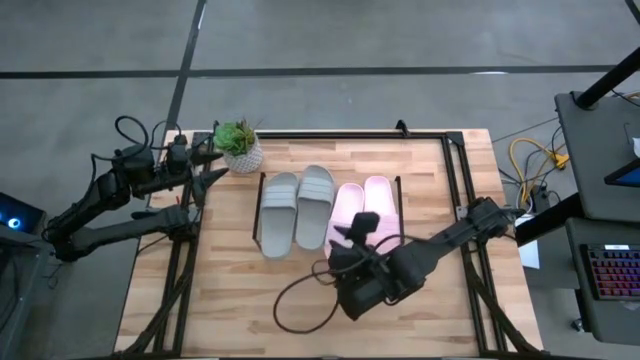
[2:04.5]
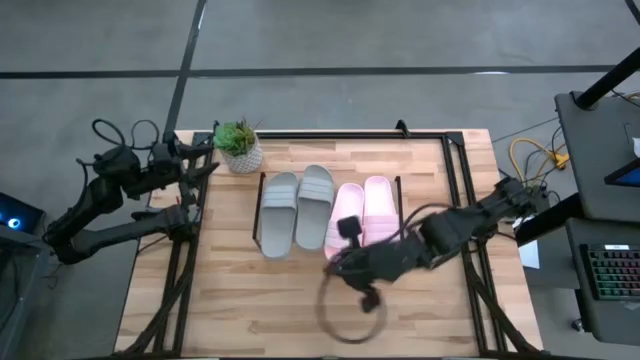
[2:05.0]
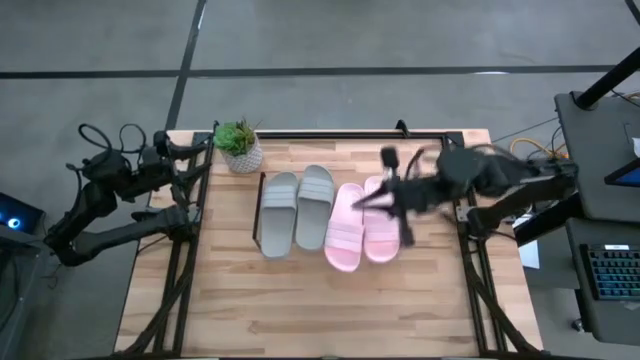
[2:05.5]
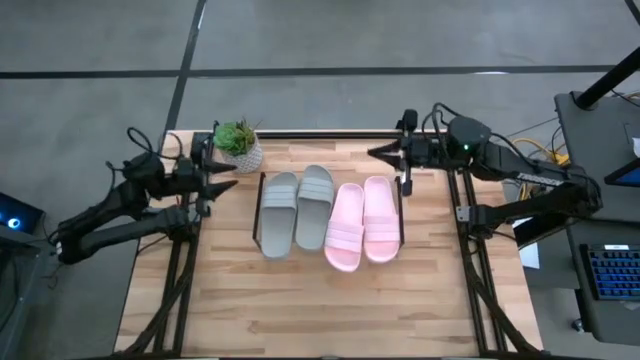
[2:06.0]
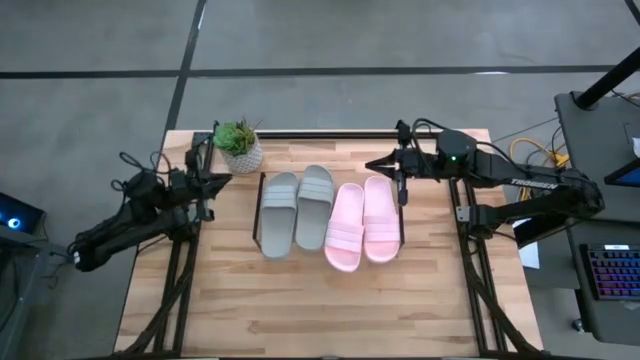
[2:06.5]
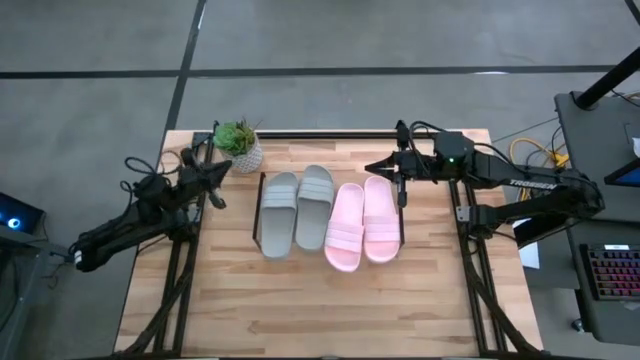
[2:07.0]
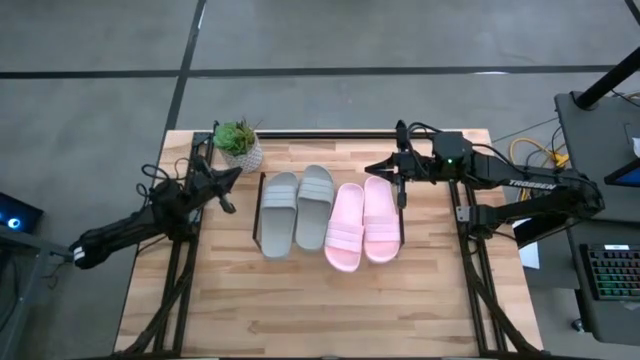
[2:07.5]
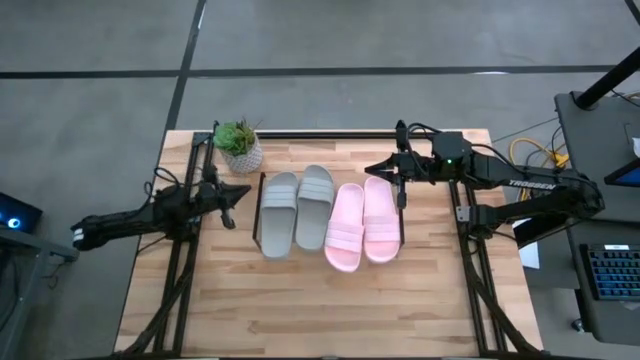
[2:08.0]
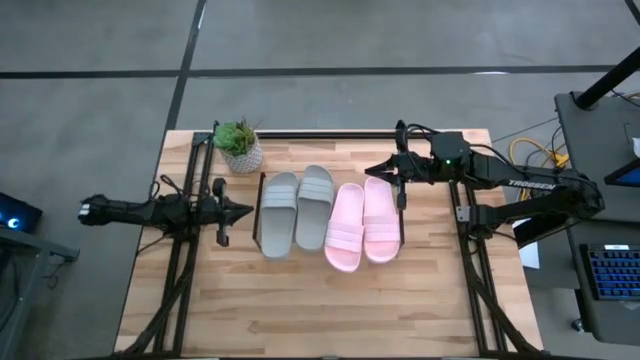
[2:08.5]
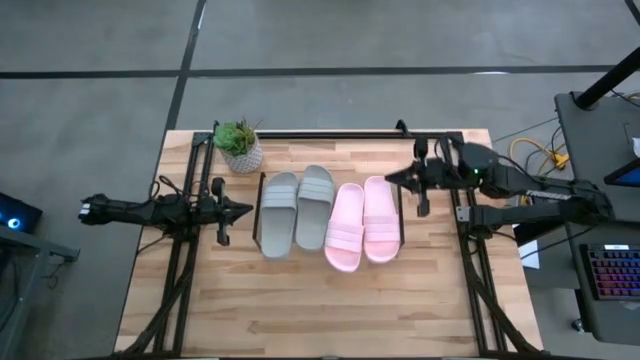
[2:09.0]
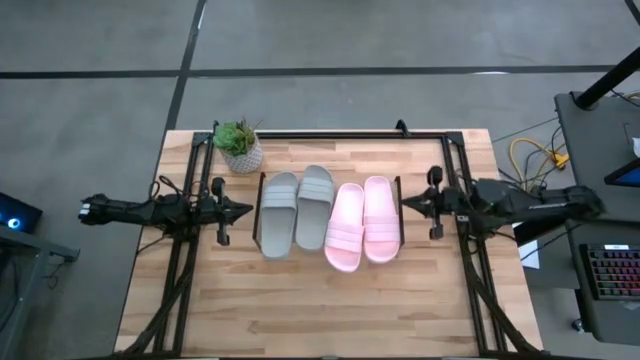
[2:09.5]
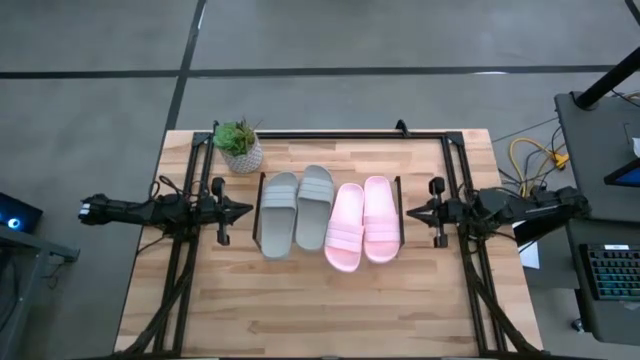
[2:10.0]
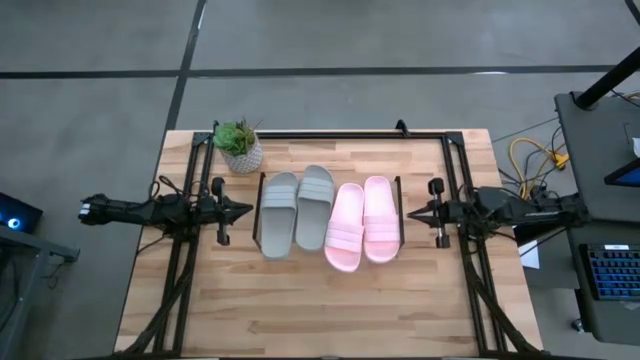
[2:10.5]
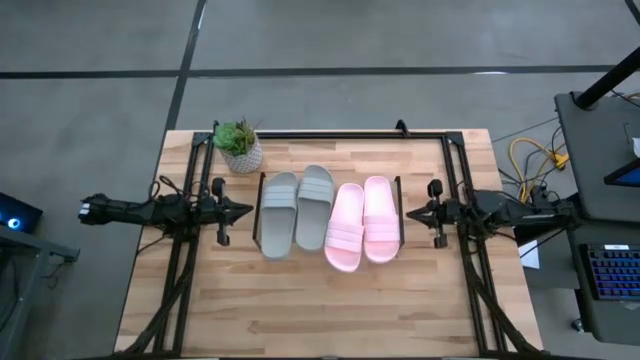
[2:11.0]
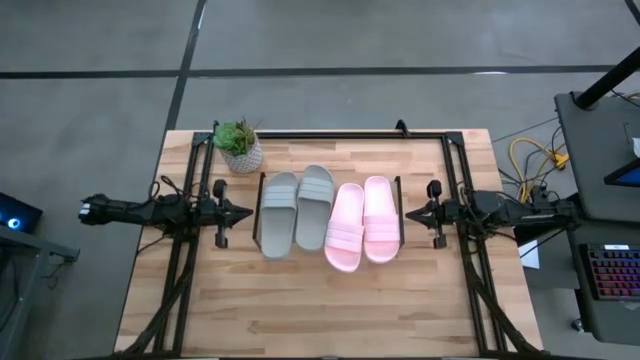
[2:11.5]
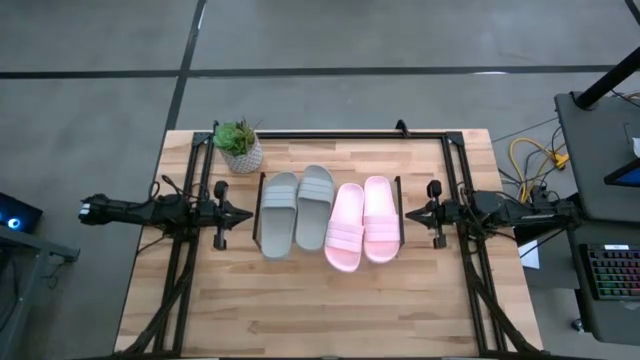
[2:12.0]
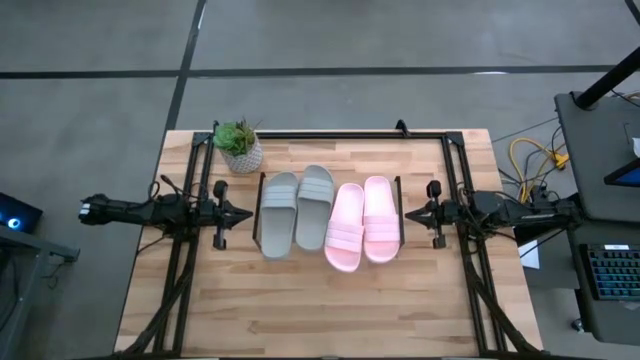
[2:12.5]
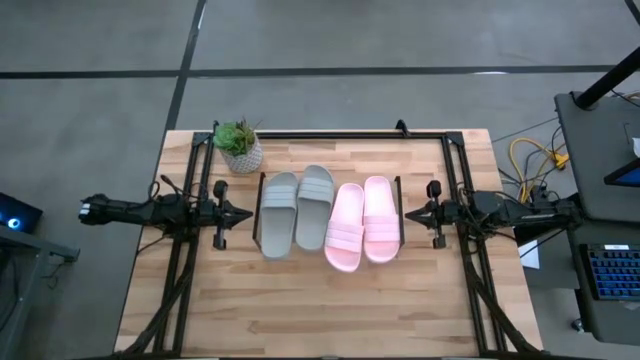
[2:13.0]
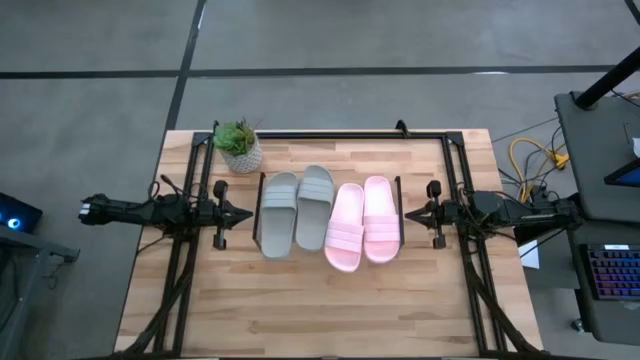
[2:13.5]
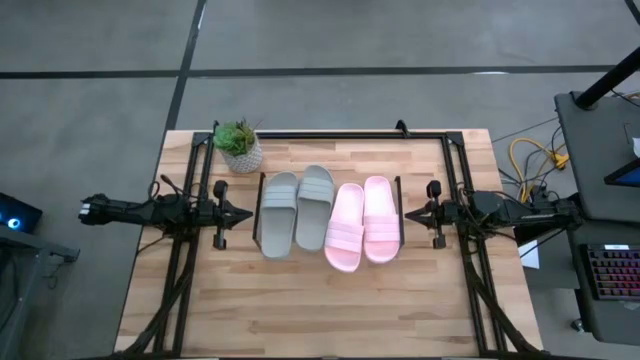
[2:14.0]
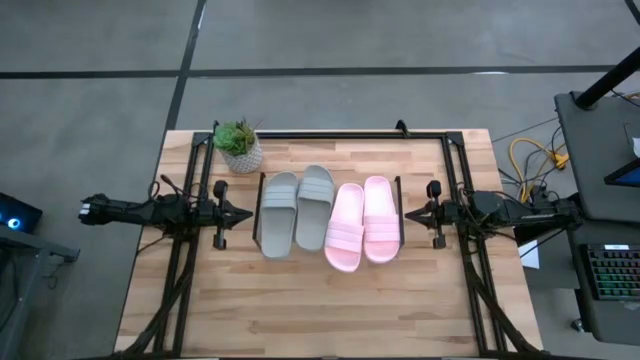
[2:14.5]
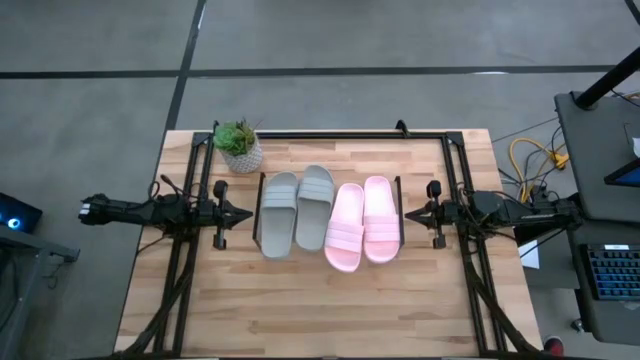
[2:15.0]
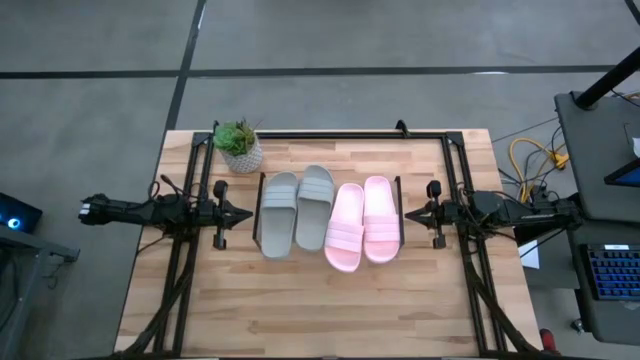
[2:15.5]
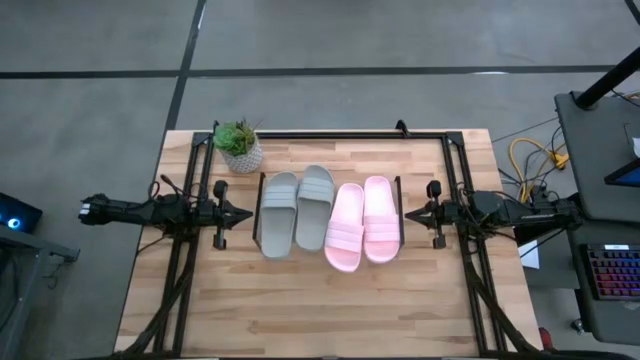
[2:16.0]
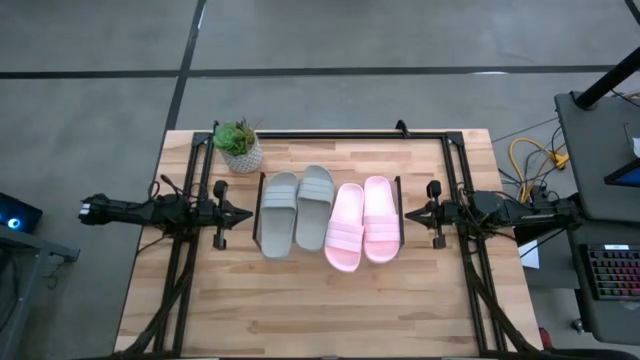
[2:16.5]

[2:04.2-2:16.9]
Task: Pick and place slides into the shelf
Return to Home Position

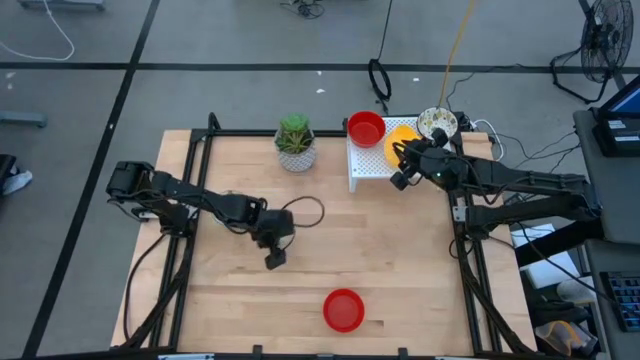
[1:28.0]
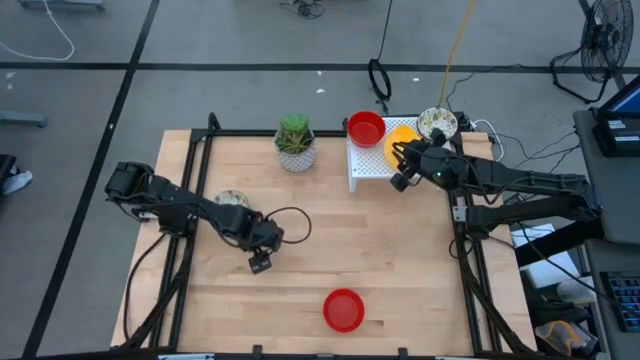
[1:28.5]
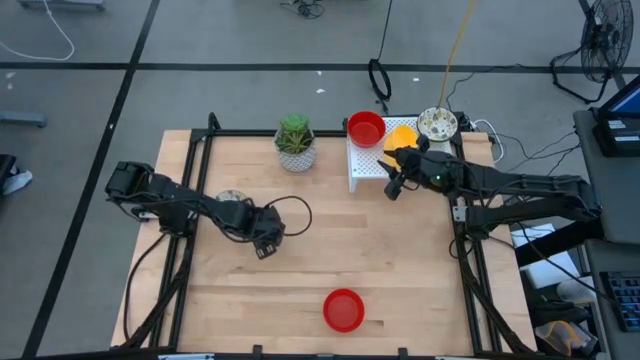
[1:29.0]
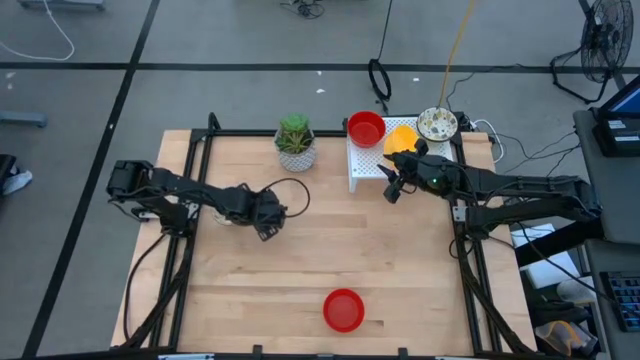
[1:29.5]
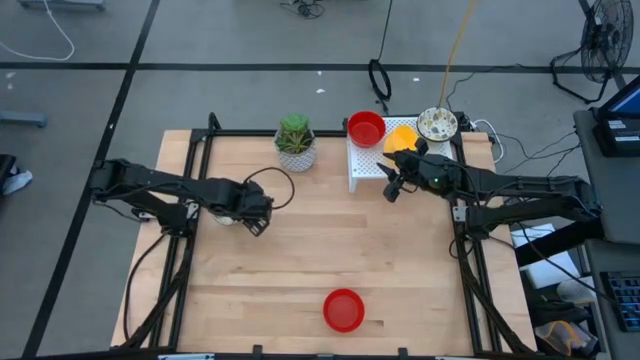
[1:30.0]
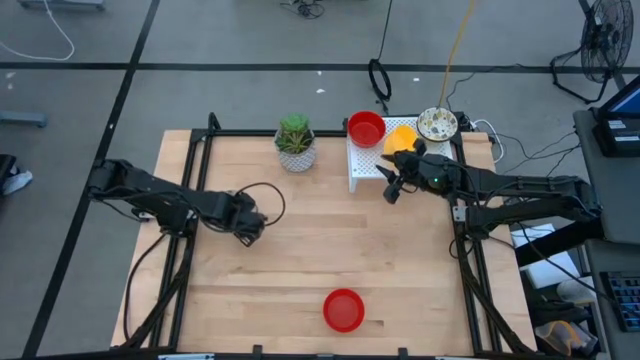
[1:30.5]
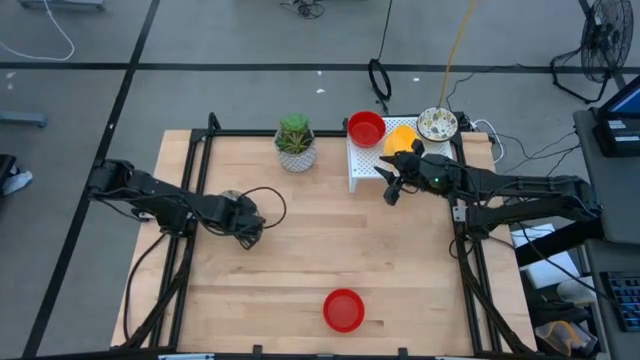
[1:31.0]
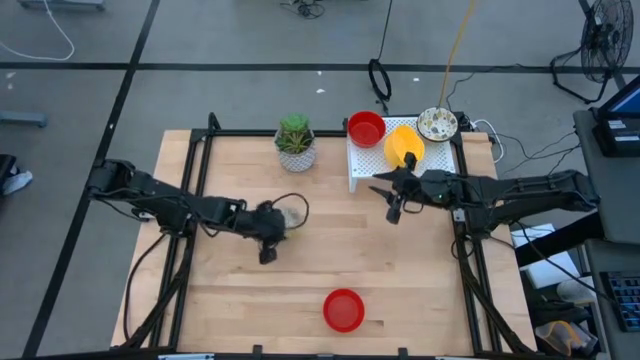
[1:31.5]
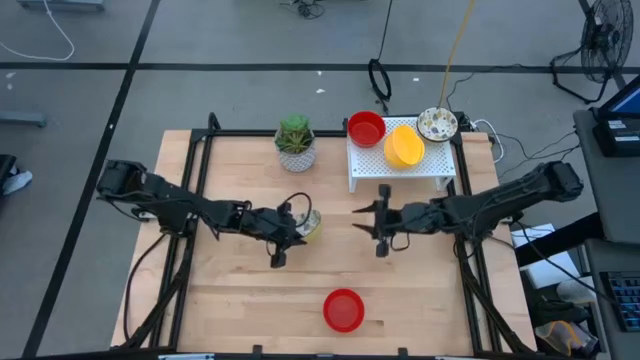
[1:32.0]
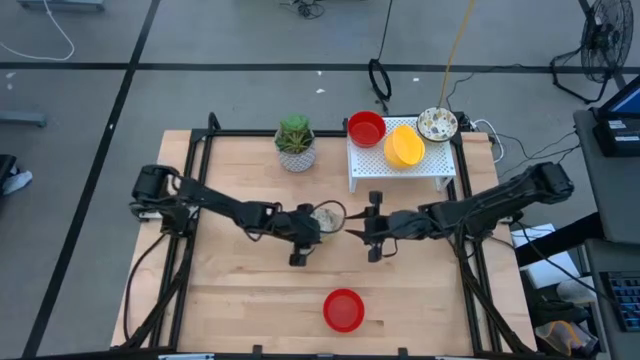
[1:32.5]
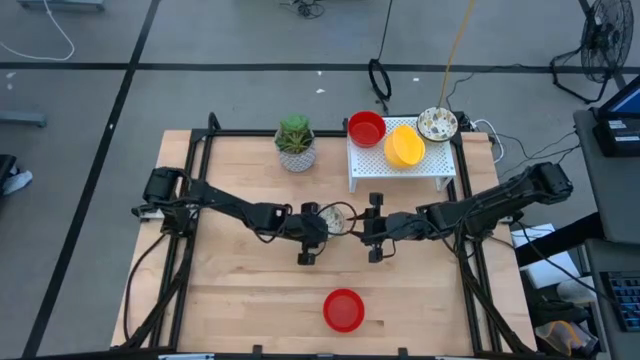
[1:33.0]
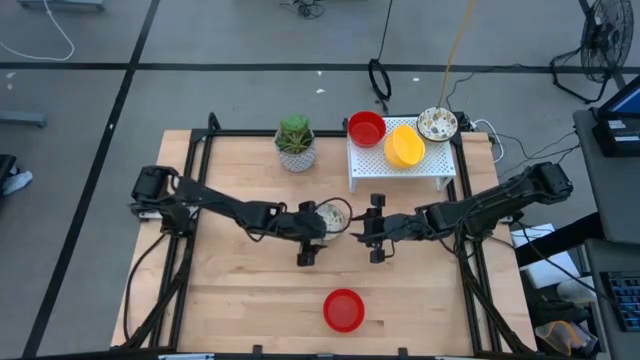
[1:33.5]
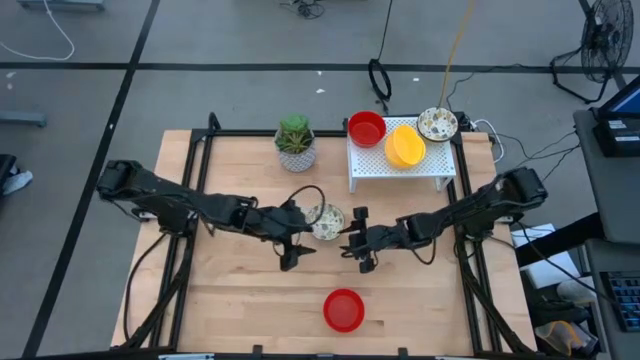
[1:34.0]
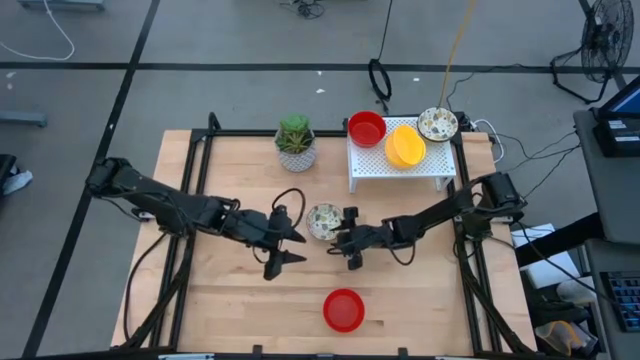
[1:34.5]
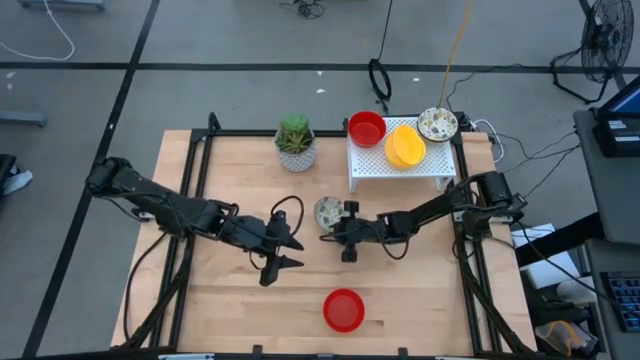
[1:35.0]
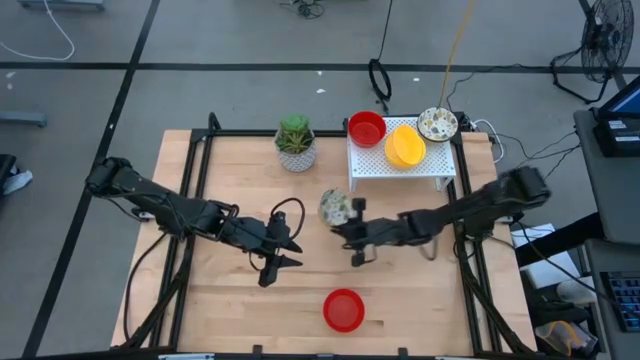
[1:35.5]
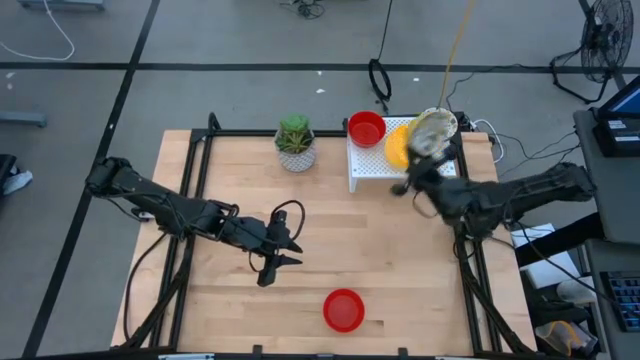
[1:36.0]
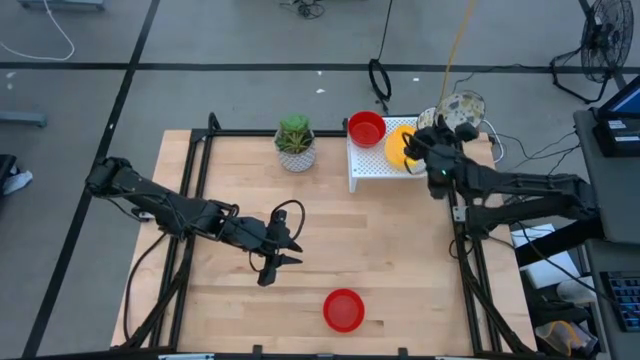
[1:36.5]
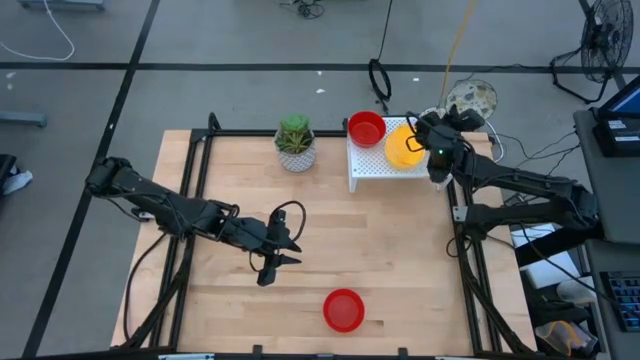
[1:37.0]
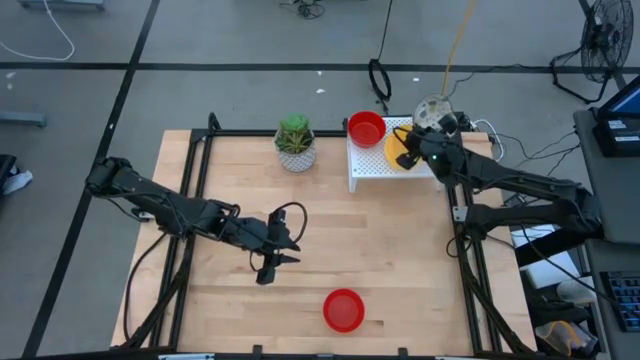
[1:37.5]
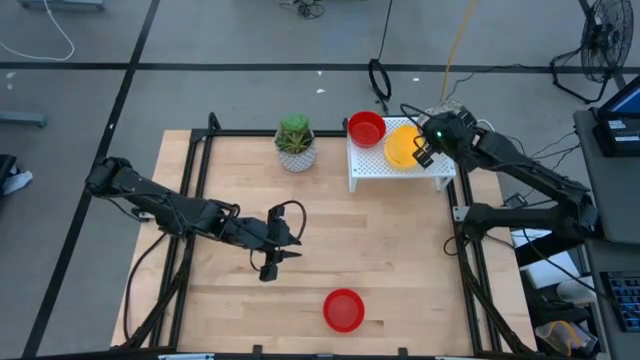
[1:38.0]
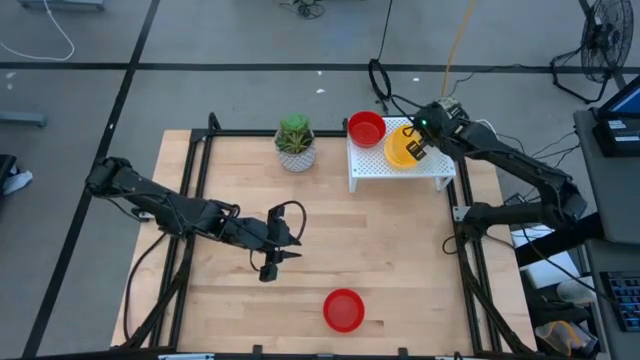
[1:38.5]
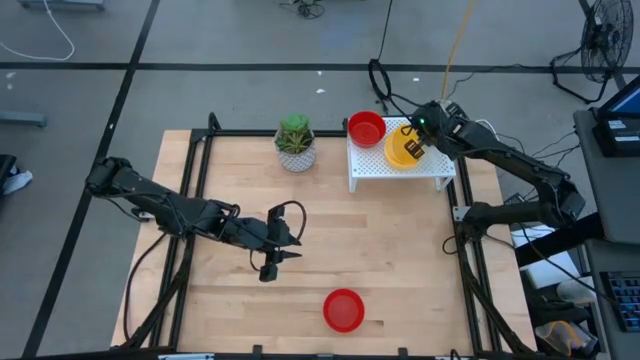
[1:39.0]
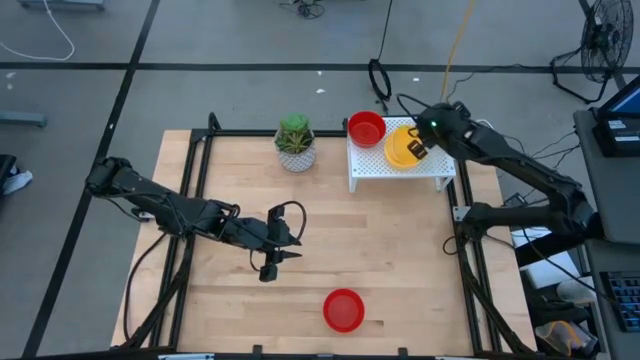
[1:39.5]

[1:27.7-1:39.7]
Task: Pick & Place Mini bowls
Stack the white and yellow bowl on top of the other white and yellow bowls on the shelf
